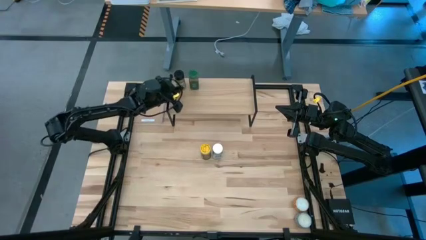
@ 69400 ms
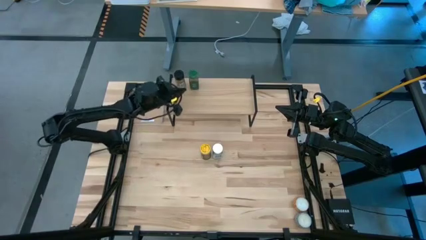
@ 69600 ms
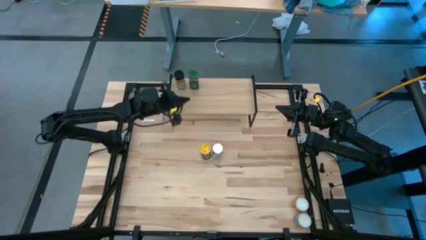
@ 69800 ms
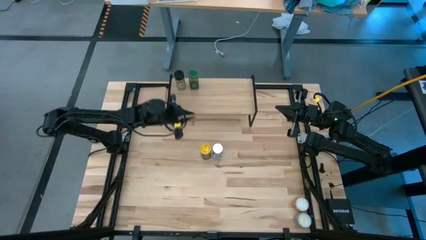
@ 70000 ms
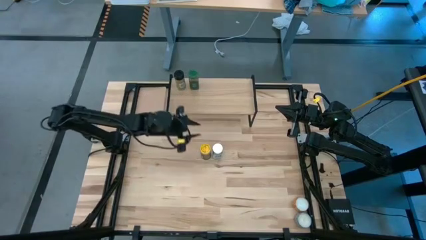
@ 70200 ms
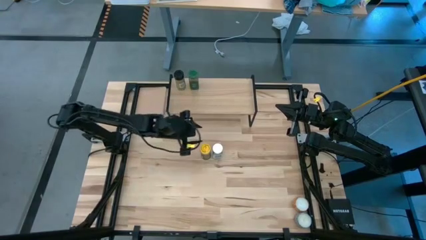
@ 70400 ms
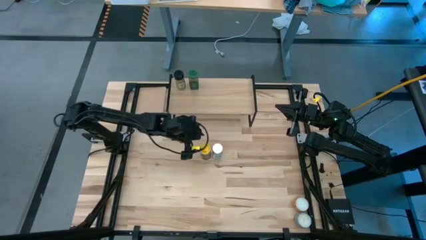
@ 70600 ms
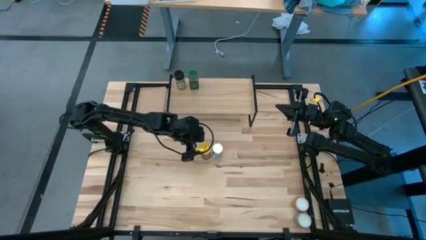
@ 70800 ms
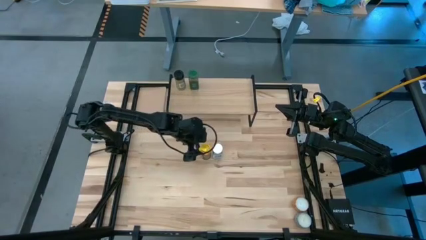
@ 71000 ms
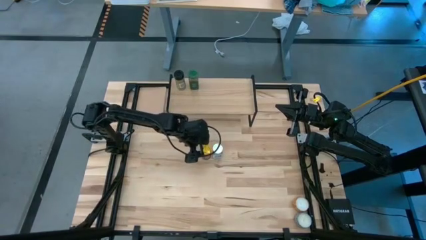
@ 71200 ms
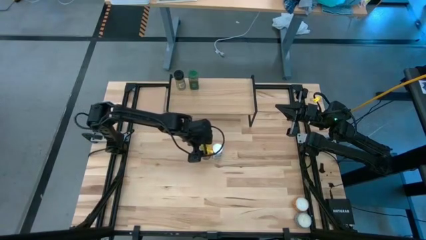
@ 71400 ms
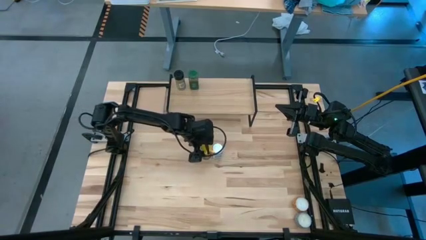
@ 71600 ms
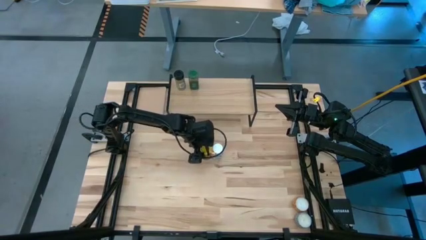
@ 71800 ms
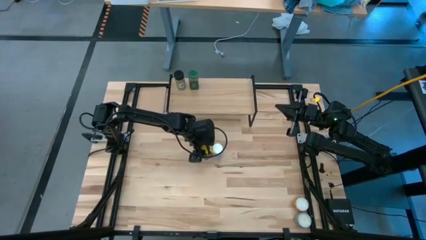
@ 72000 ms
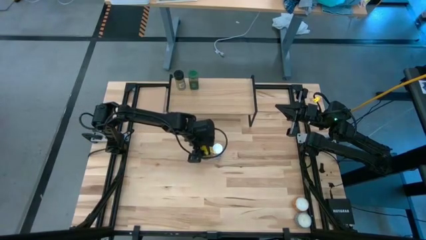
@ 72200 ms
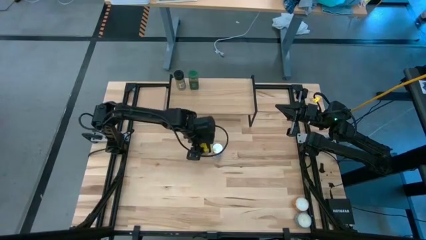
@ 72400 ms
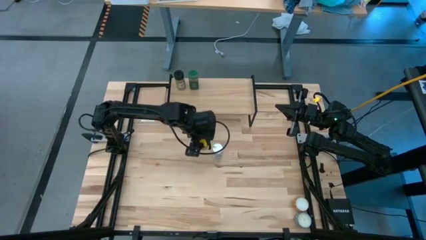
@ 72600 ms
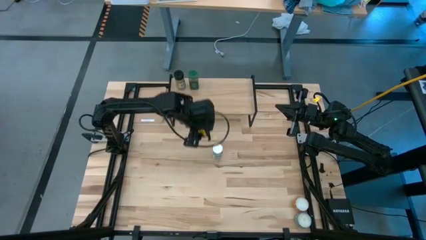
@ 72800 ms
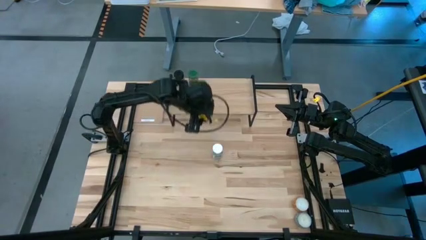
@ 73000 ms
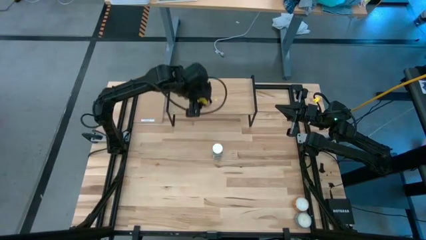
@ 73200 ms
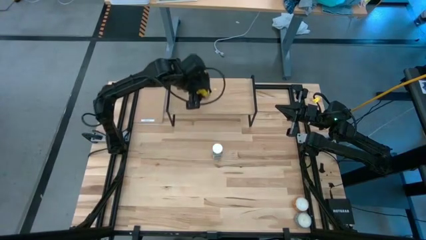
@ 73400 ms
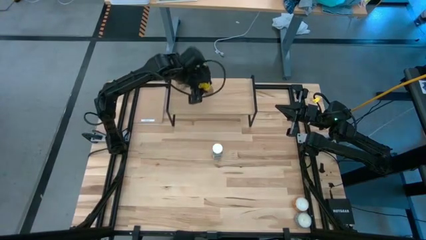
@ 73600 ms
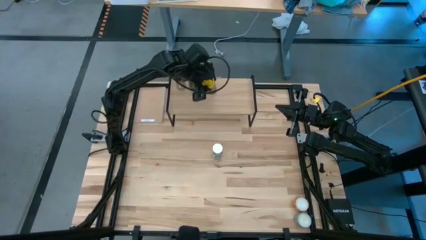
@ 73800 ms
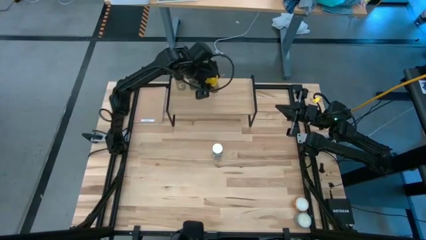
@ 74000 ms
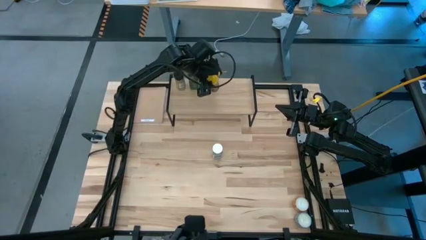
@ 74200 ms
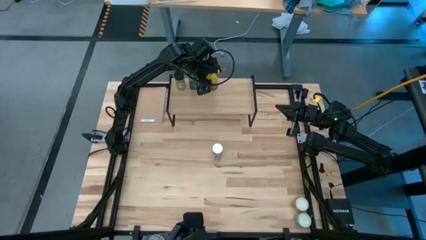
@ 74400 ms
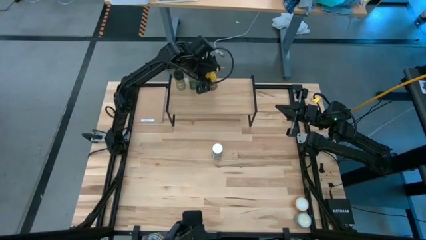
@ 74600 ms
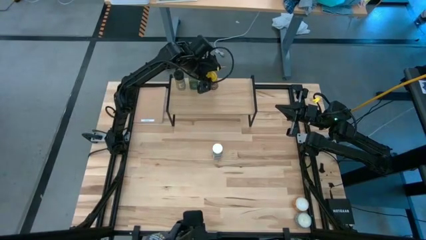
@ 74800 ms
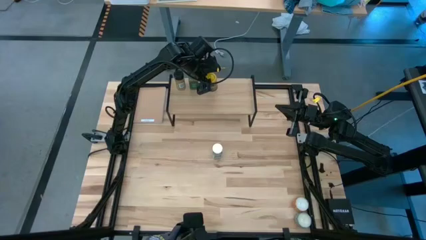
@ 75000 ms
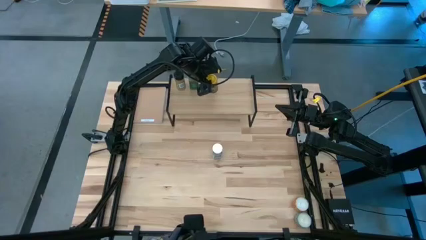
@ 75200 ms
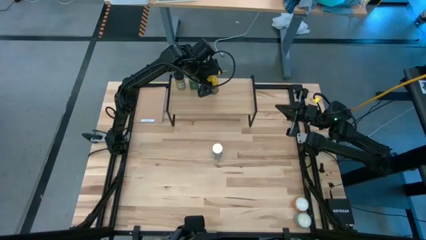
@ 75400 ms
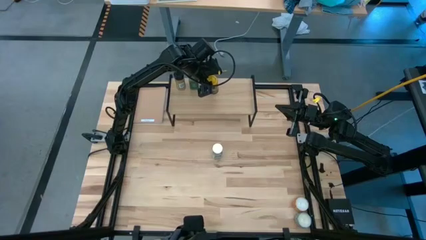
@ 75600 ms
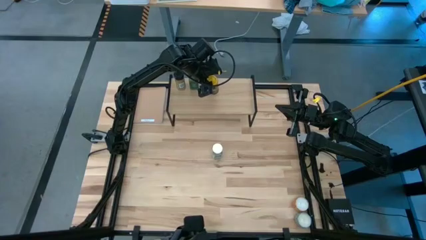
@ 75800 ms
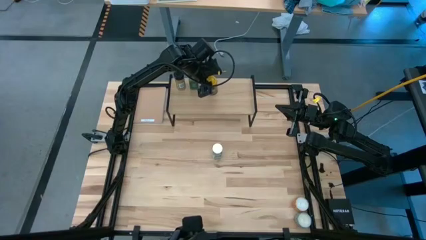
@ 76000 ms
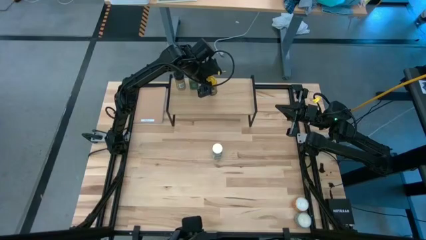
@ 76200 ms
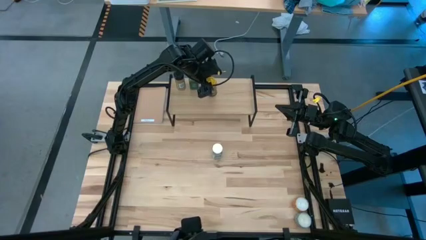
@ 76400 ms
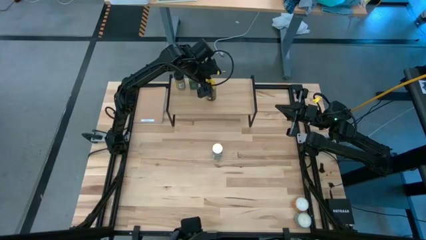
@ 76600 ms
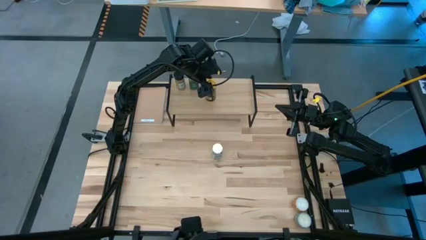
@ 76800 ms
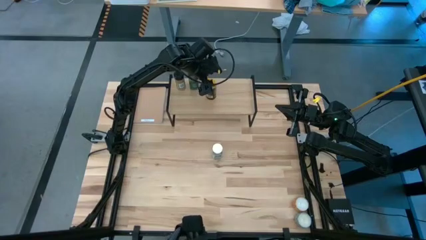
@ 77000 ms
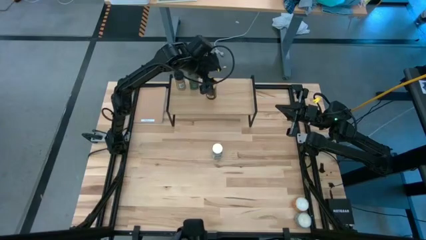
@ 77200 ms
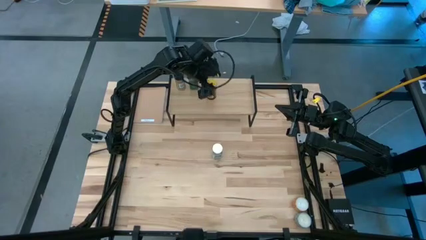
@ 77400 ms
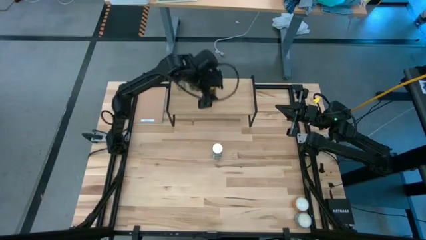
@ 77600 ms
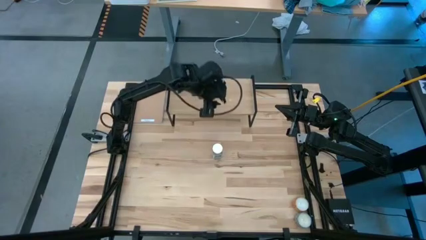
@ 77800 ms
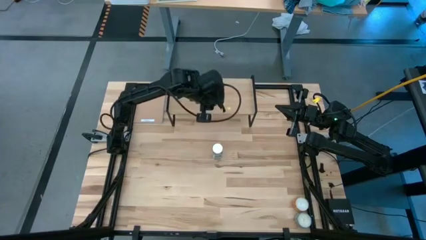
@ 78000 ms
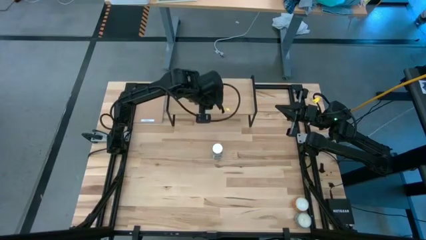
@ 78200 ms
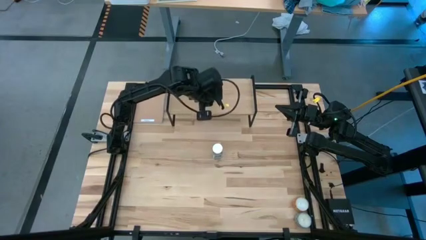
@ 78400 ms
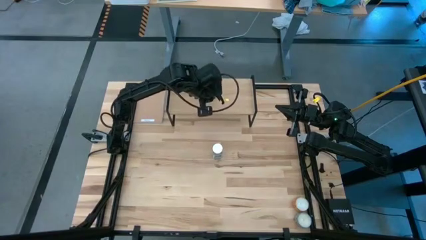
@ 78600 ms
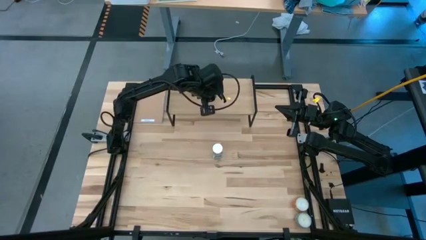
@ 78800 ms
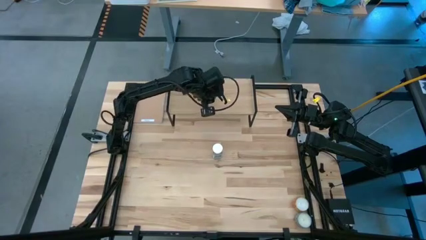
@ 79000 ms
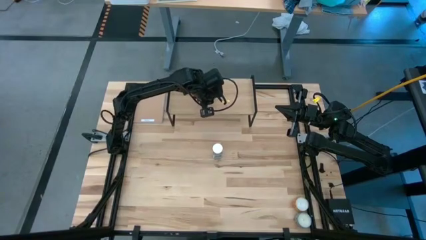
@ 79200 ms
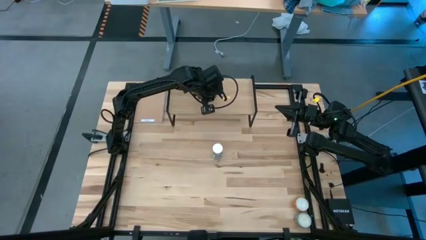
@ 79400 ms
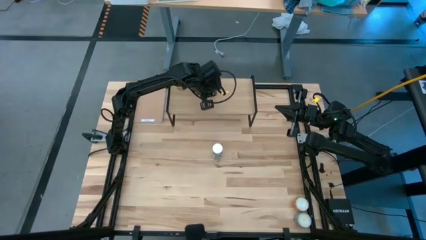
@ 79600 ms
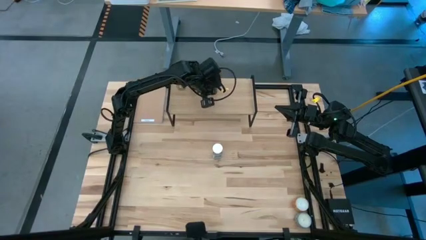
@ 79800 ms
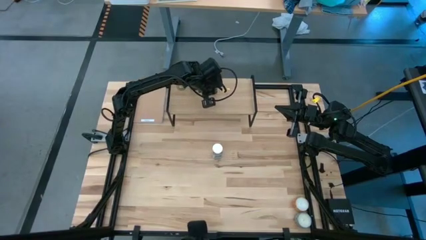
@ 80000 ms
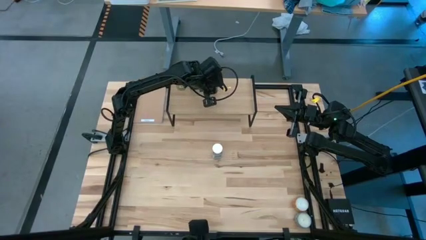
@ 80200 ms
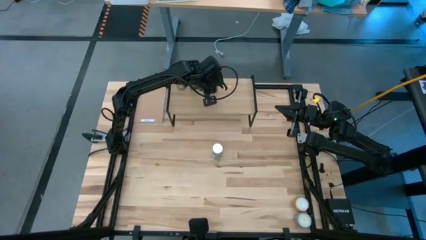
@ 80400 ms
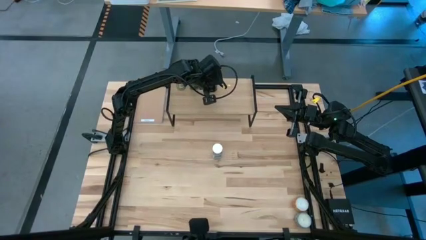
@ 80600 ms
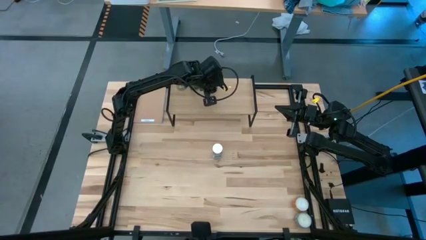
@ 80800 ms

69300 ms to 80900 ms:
Task: Shelf spices
Put the yellow seasoning bottle on the shelf

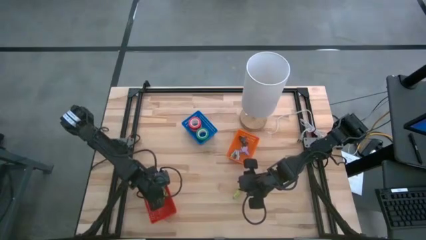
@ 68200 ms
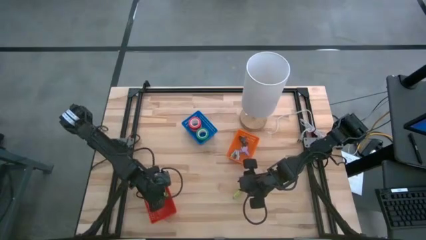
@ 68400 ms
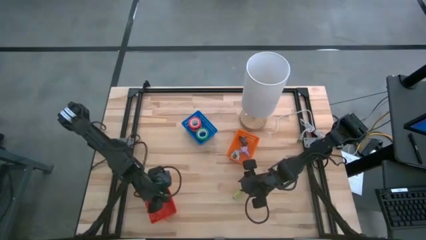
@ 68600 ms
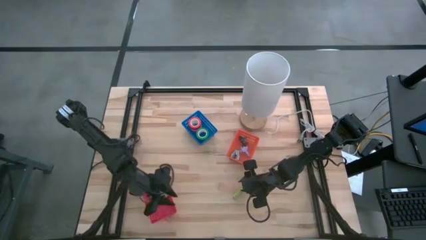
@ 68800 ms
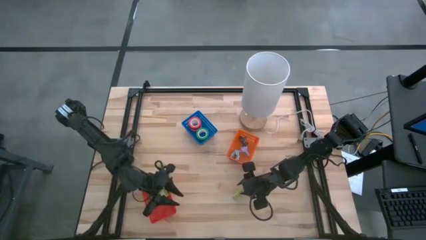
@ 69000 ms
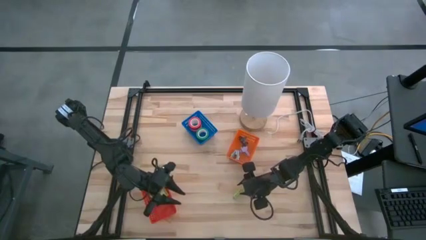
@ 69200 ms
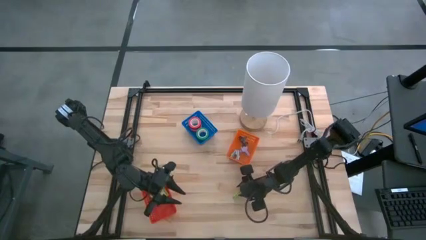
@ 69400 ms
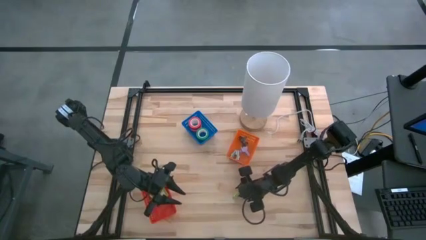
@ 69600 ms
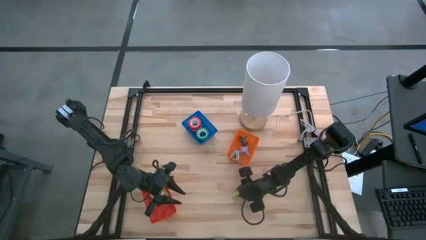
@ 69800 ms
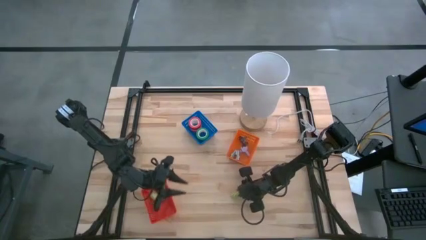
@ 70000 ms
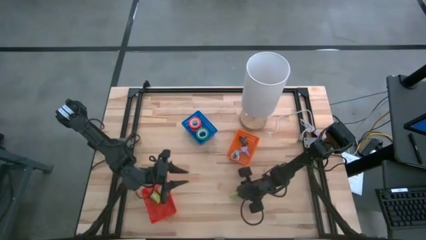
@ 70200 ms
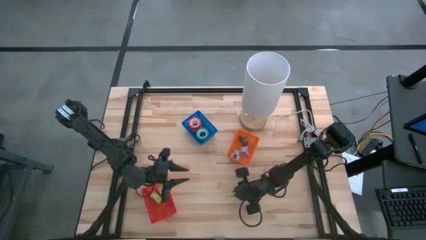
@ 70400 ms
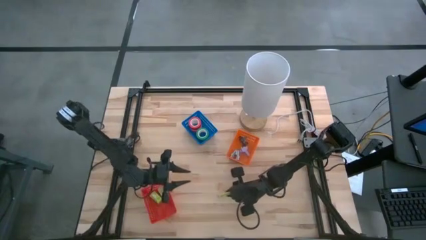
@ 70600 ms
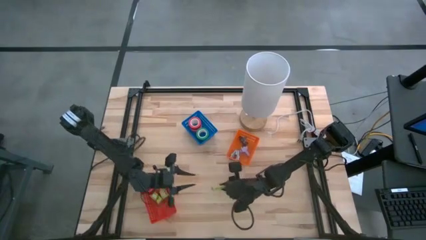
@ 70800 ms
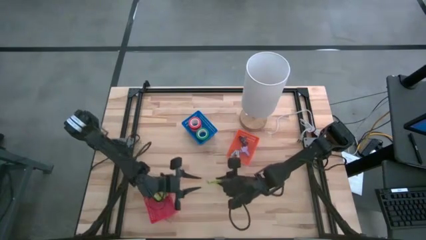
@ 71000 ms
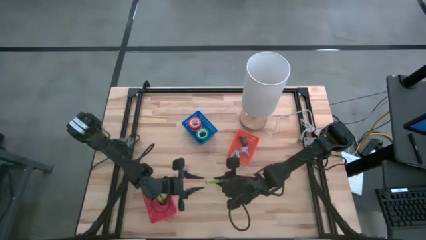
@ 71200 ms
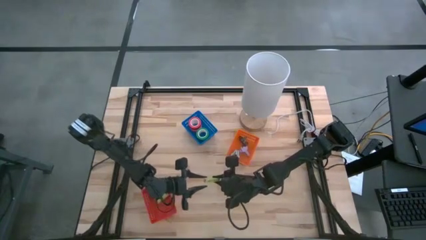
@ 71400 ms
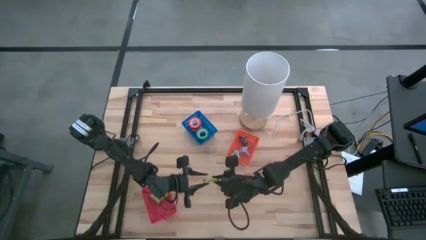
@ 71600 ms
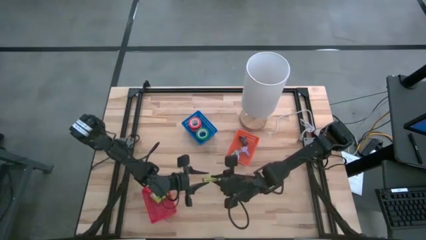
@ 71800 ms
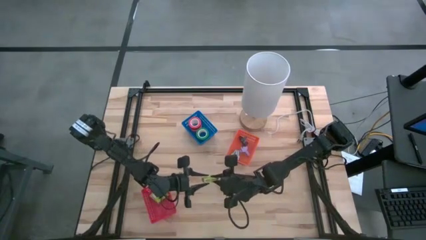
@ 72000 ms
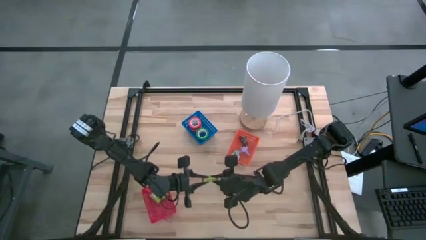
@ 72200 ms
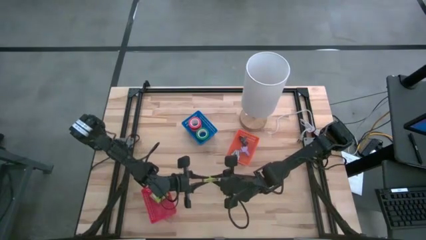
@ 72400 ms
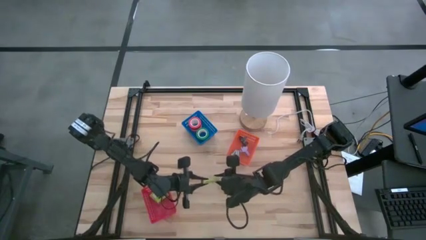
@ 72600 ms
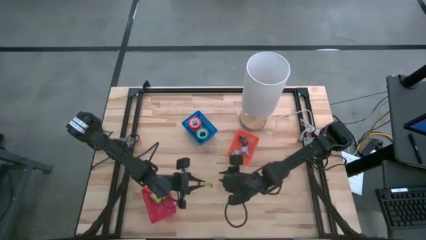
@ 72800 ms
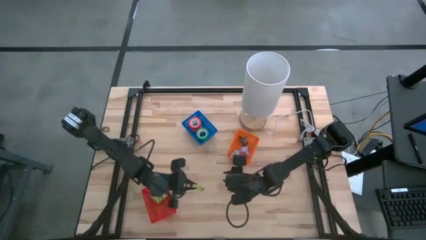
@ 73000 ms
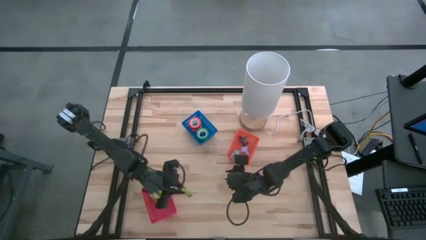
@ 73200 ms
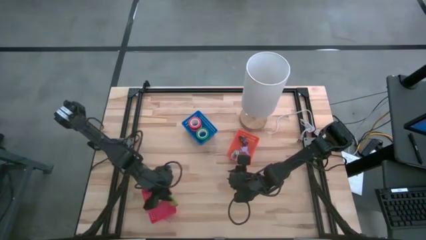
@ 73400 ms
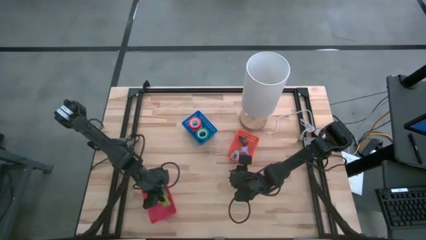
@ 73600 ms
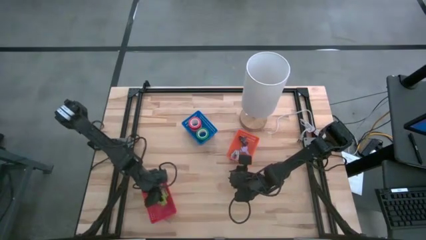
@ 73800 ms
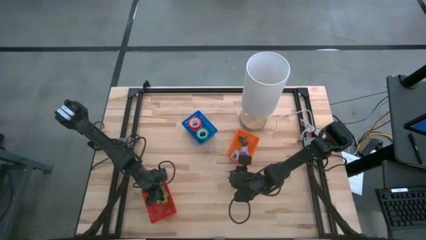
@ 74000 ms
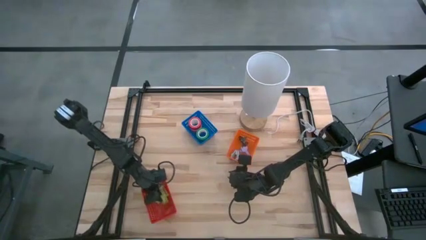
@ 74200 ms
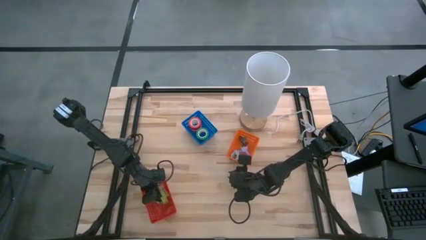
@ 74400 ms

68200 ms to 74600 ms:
Task: Pick and place Stapler, Stapler remover, tape
Put the green staple boxed into the red basket
